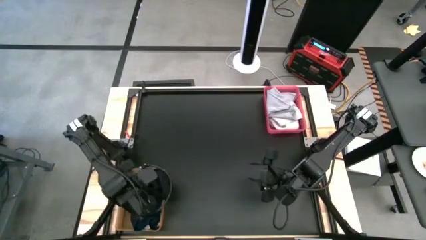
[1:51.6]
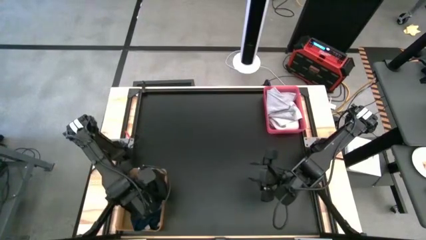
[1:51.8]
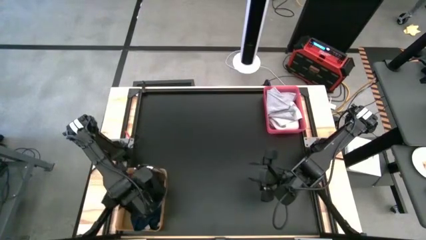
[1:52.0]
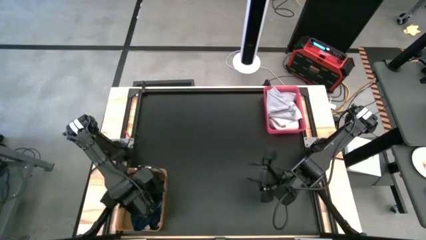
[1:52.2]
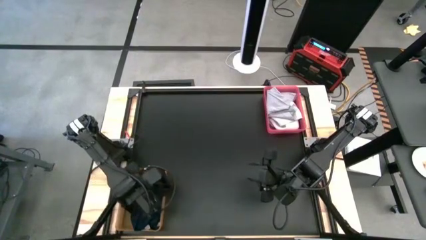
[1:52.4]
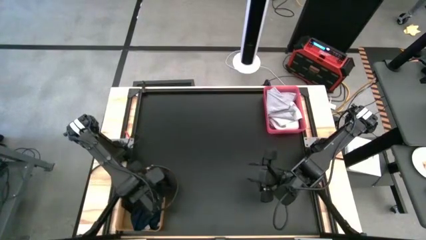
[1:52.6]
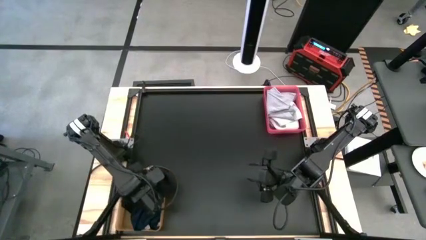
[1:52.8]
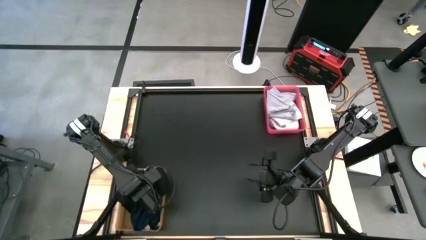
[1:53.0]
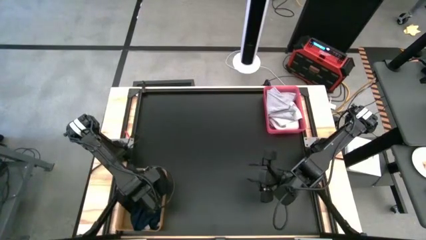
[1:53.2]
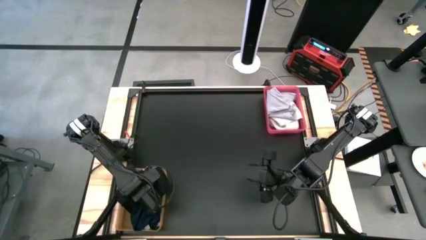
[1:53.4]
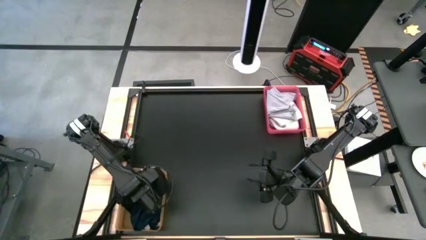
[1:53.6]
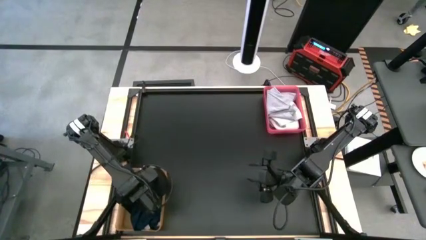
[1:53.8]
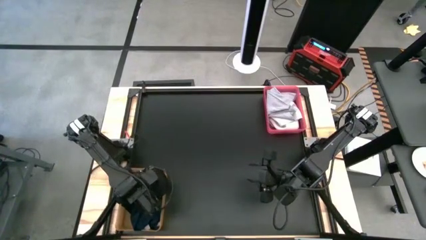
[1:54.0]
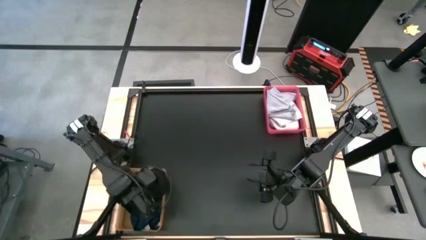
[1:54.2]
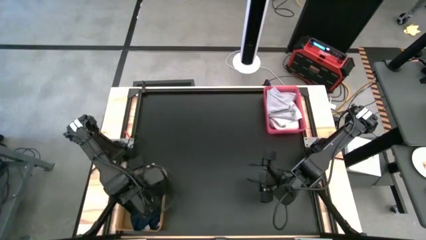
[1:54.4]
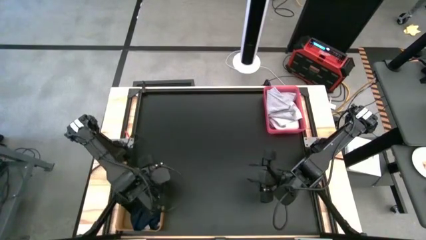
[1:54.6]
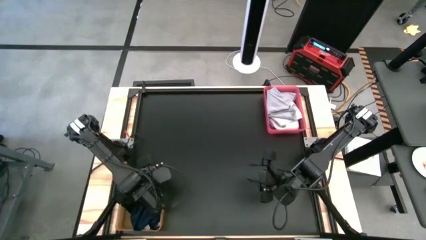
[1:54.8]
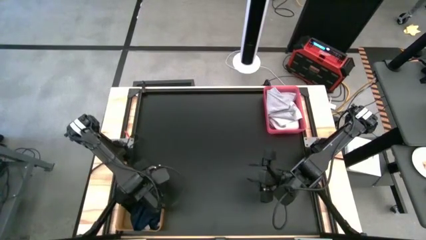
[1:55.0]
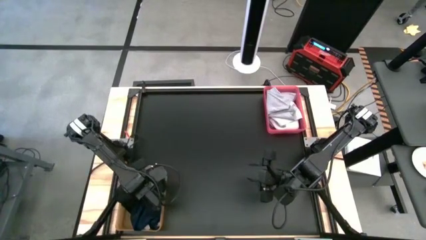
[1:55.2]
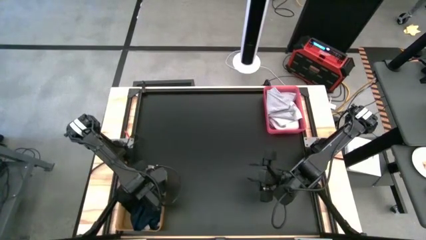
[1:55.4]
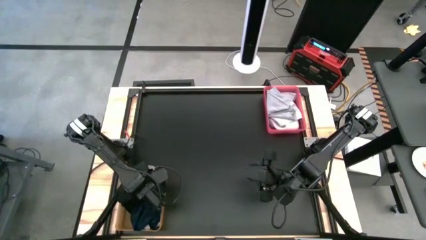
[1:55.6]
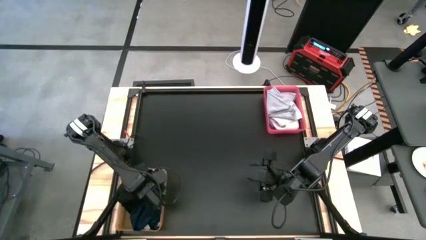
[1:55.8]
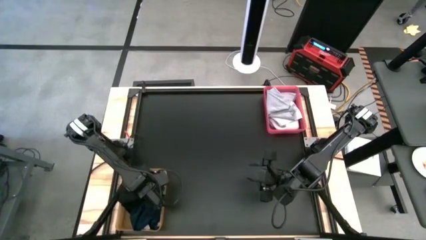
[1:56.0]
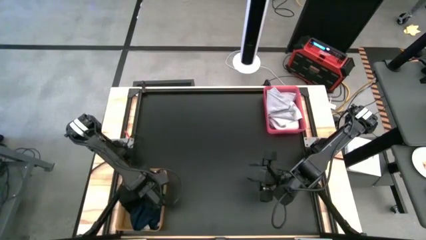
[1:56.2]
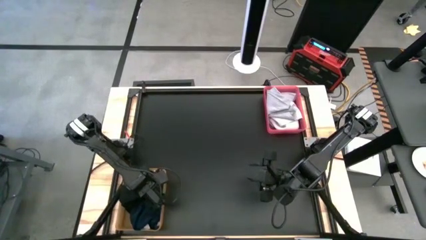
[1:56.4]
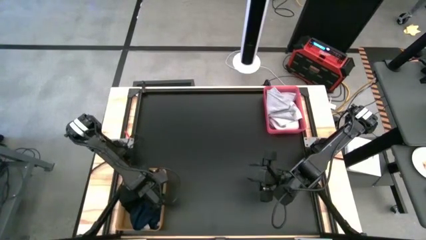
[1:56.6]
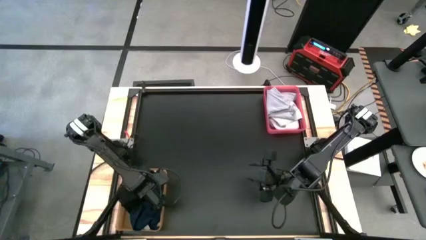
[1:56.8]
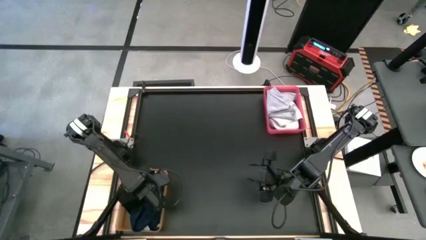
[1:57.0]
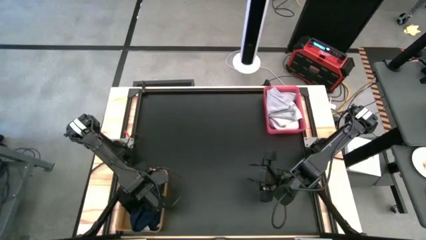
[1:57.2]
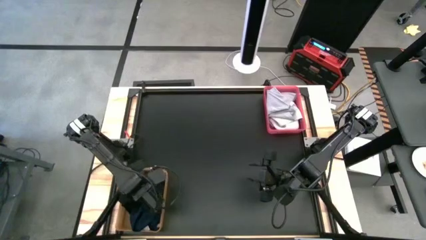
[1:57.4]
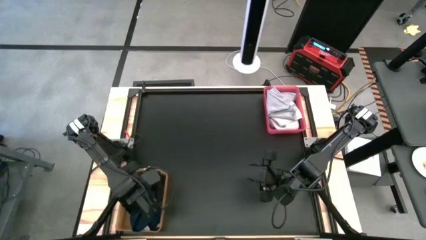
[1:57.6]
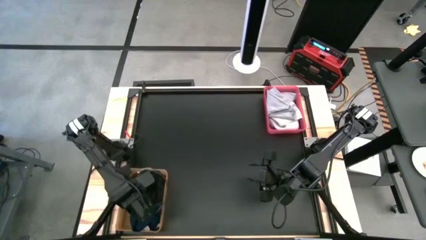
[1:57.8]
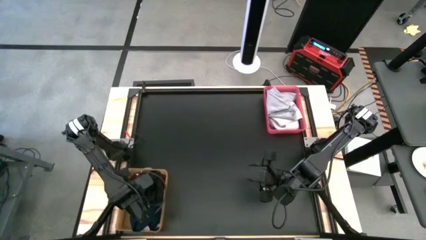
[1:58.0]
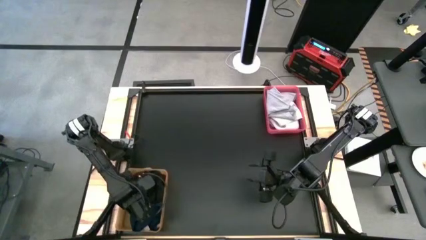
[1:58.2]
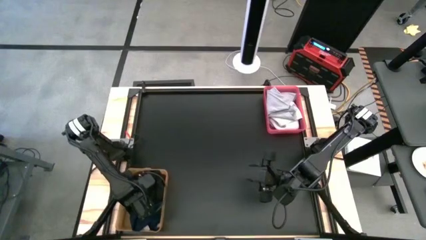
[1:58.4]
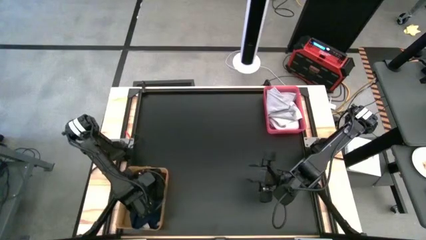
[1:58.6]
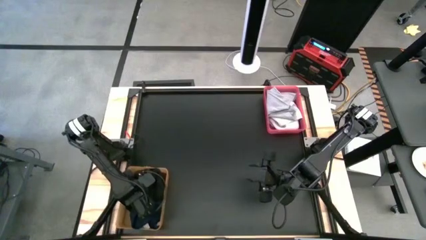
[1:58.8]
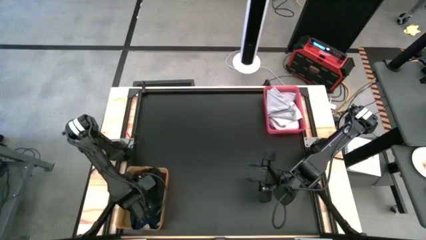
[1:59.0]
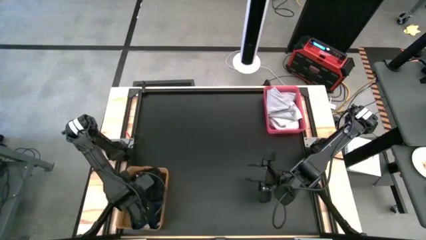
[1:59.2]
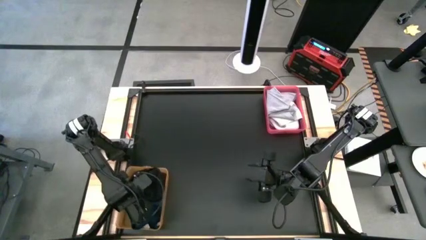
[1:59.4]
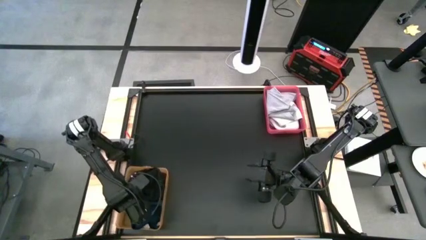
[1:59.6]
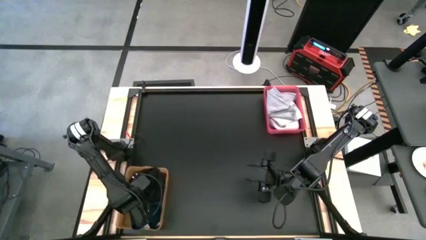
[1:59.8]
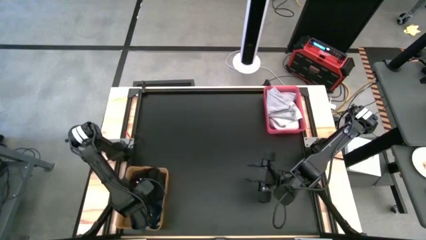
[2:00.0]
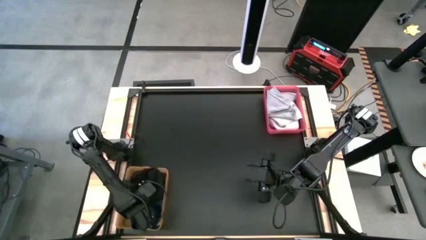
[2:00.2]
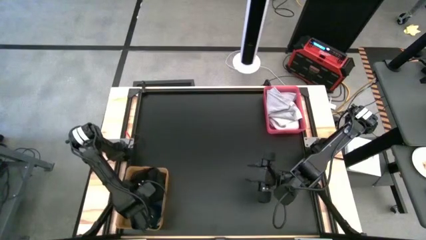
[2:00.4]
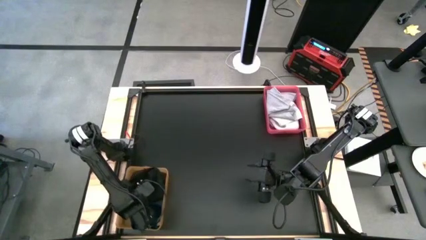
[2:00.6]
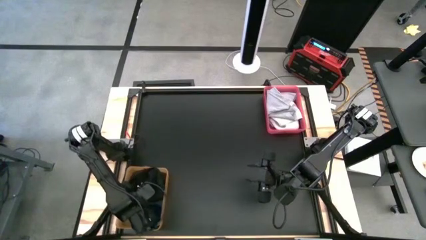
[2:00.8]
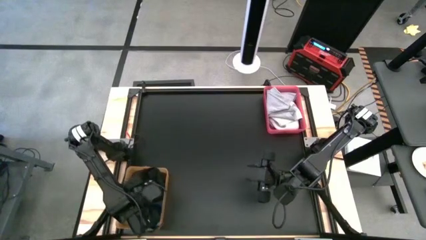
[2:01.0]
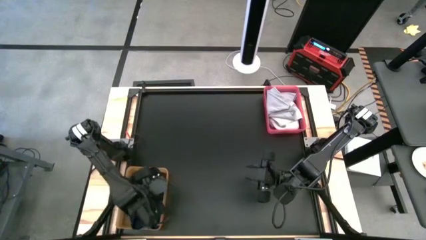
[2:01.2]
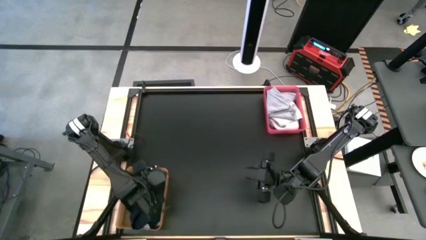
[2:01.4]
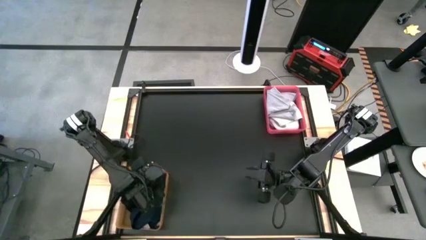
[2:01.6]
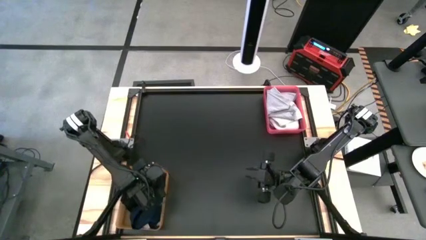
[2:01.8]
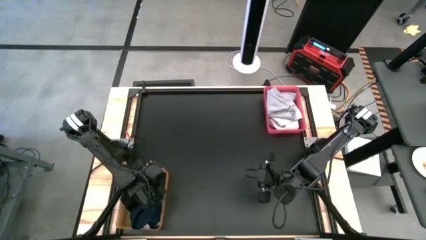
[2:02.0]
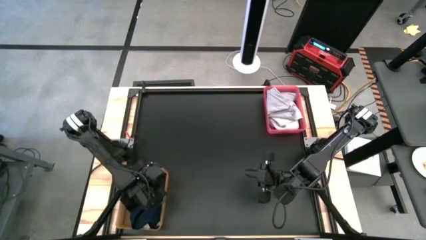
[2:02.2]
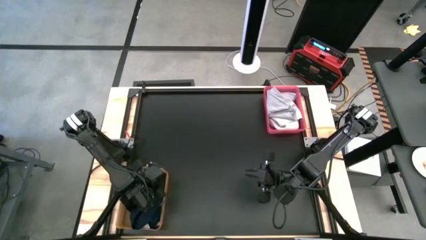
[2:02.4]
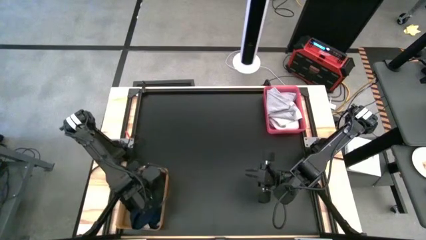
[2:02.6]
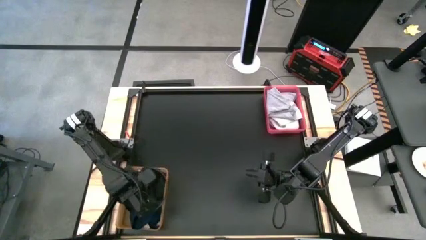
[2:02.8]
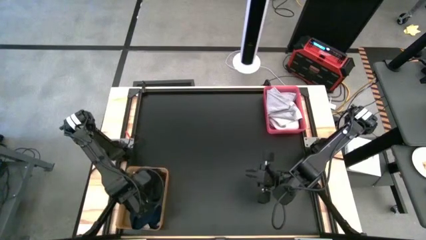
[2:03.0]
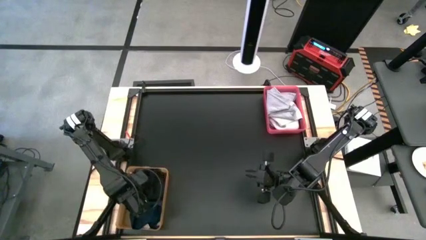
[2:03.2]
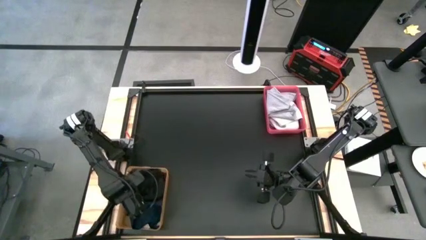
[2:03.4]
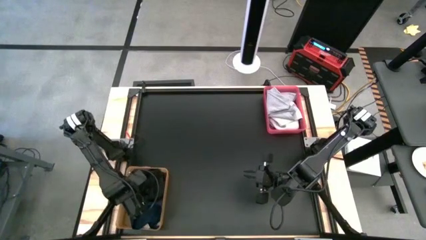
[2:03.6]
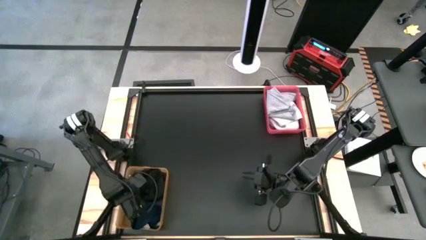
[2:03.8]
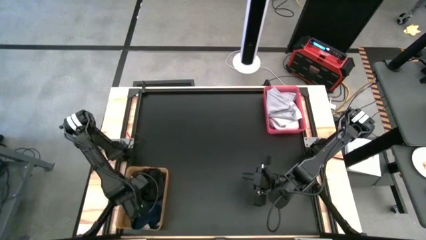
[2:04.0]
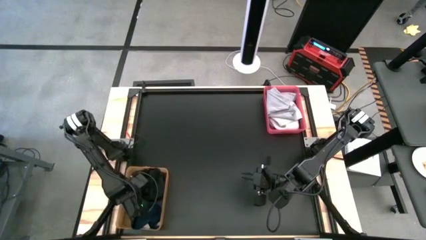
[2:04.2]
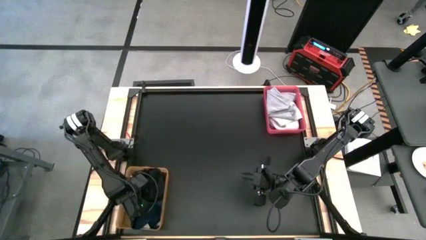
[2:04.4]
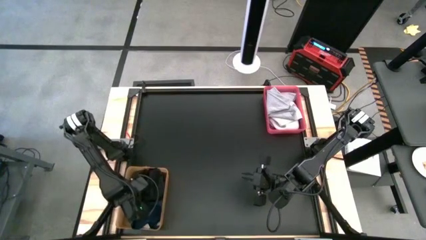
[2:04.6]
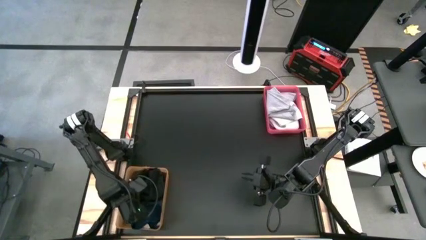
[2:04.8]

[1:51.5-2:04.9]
Task: Sort towels by color in basket
Put the black kitchen towel into the orange bin
